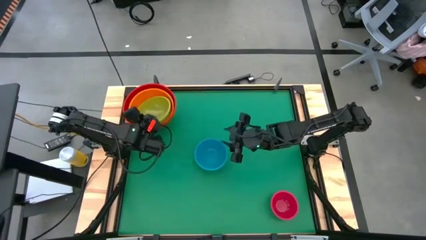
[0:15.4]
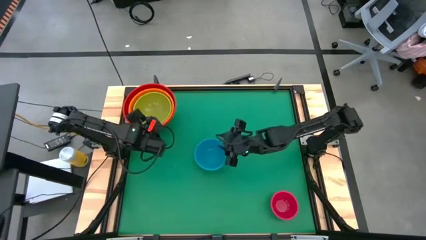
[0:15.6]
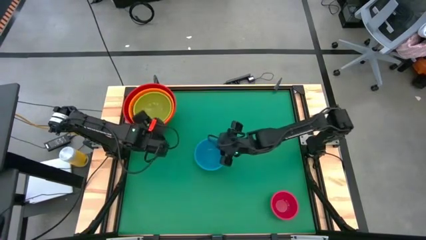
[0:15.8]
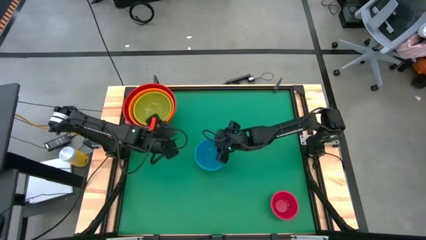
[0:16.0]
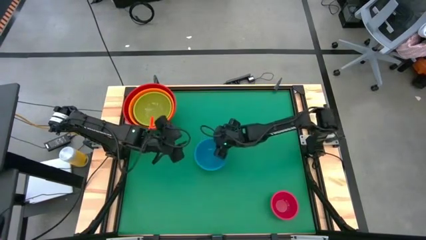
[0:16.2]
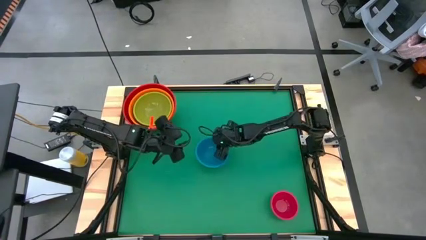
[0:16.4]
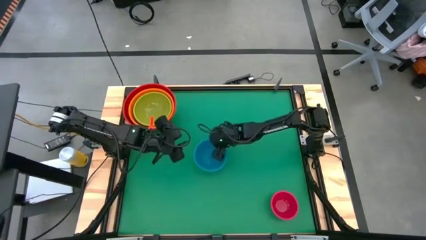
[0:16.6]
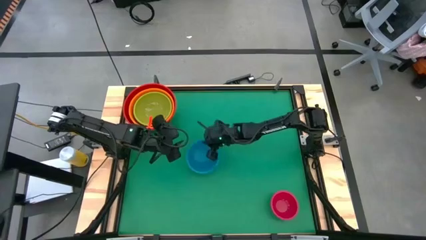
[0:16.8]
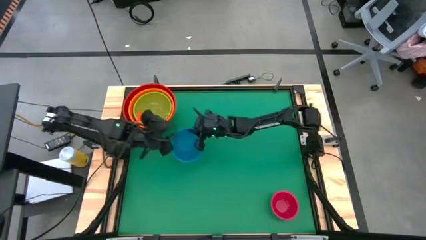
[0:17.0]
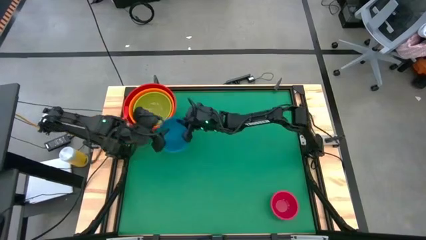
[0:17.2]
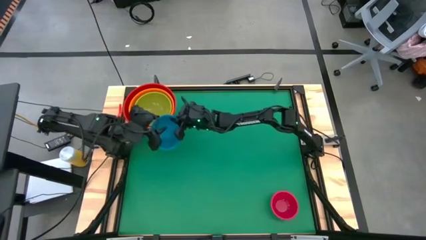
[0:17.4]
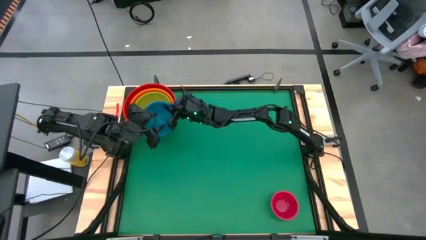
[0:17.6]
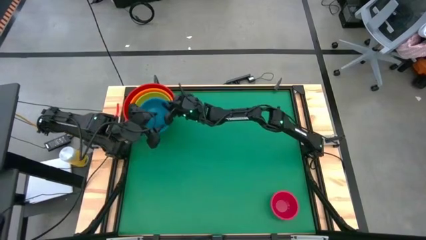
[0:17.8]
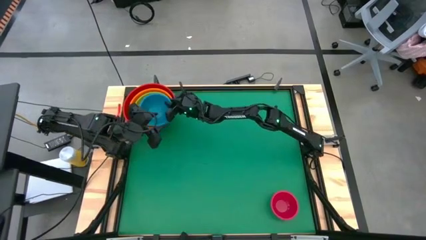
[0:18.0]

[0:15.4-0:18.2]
Stack the blue bowl on top of the green bowl

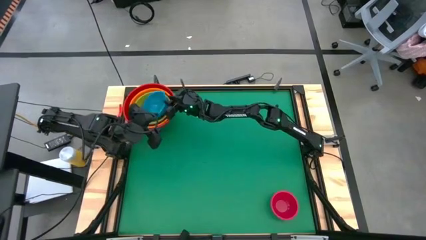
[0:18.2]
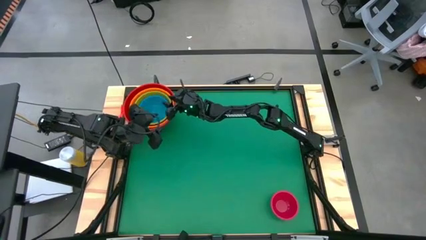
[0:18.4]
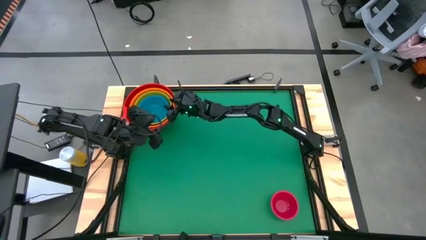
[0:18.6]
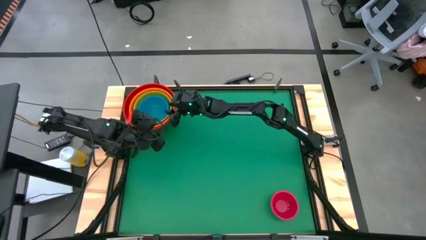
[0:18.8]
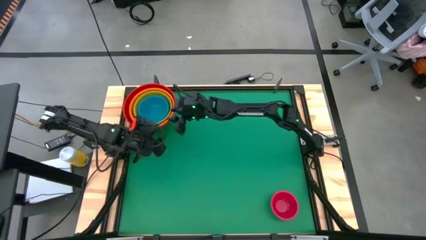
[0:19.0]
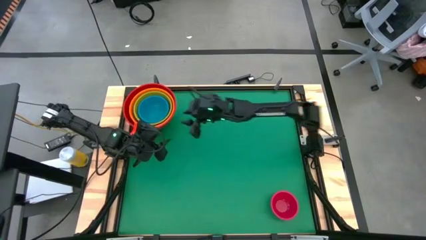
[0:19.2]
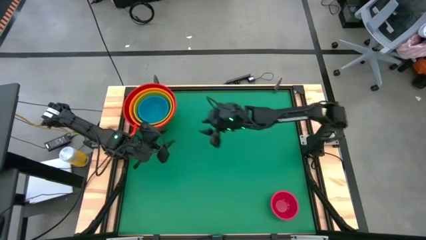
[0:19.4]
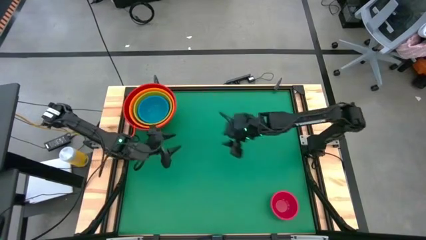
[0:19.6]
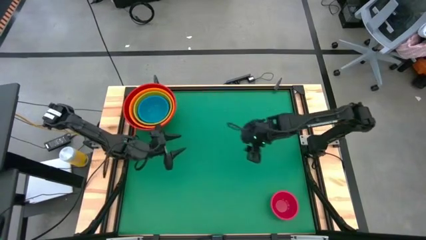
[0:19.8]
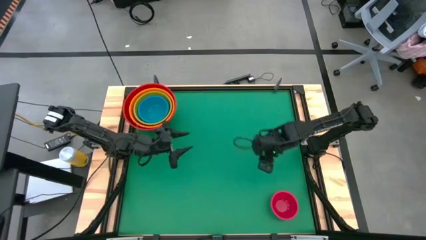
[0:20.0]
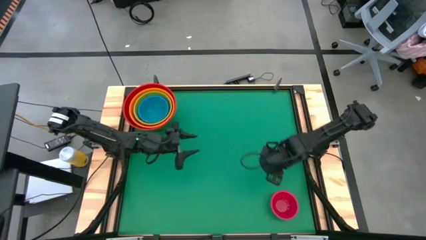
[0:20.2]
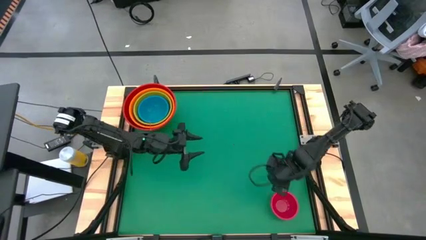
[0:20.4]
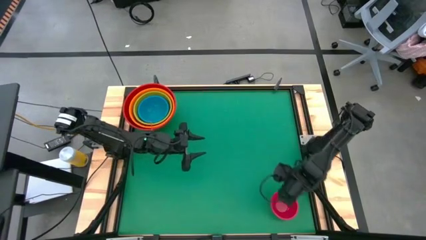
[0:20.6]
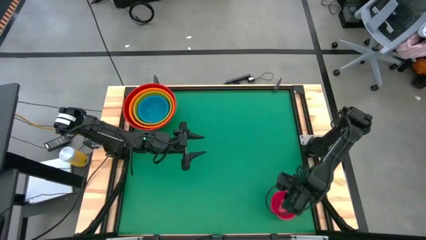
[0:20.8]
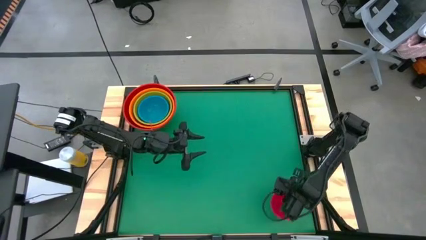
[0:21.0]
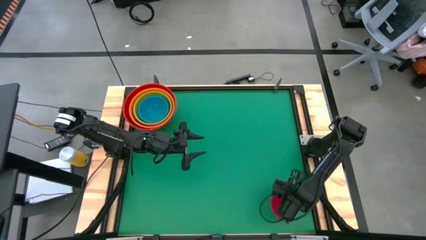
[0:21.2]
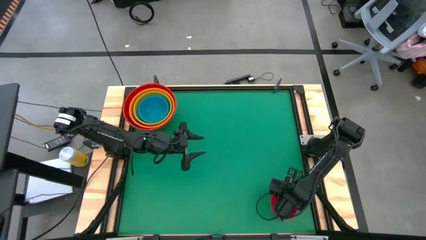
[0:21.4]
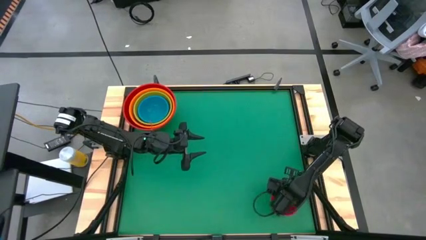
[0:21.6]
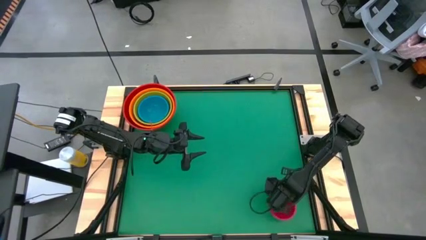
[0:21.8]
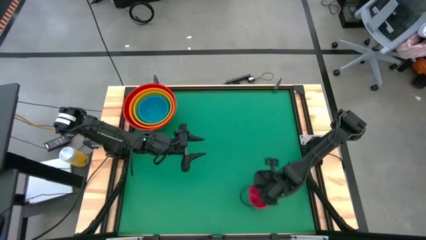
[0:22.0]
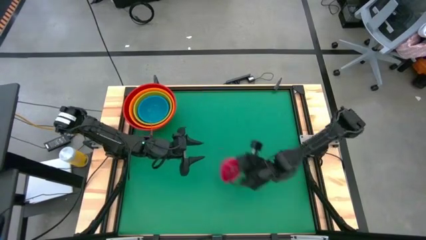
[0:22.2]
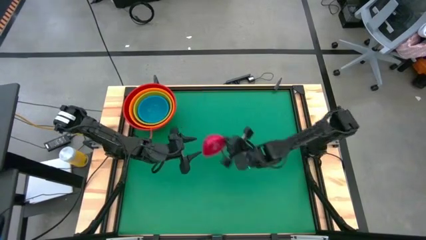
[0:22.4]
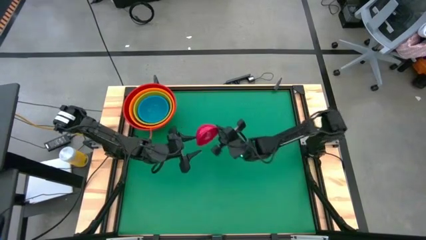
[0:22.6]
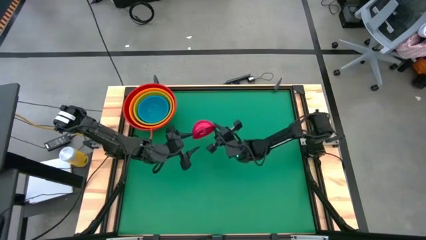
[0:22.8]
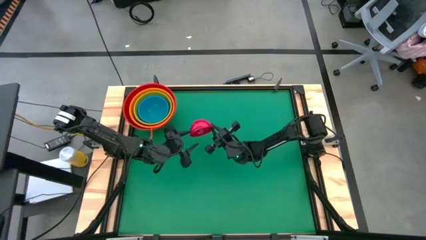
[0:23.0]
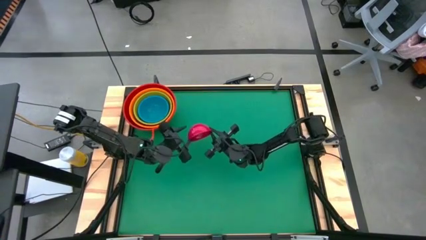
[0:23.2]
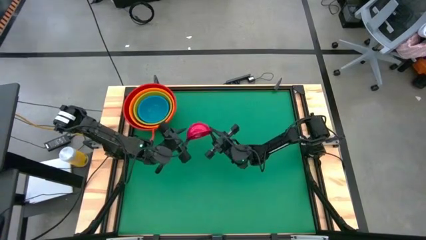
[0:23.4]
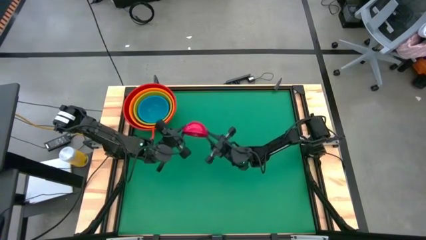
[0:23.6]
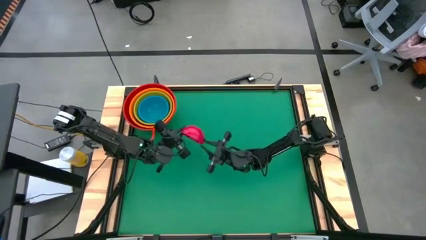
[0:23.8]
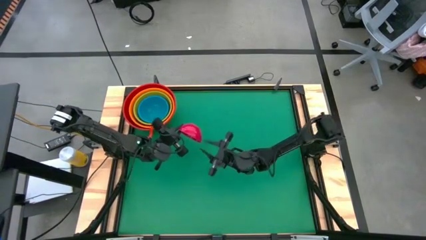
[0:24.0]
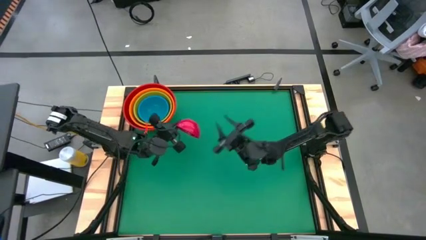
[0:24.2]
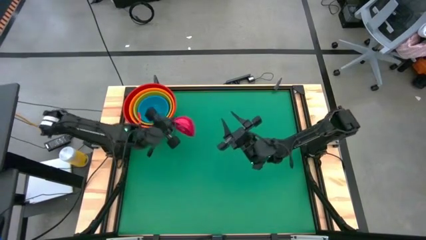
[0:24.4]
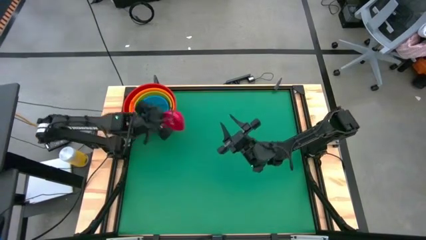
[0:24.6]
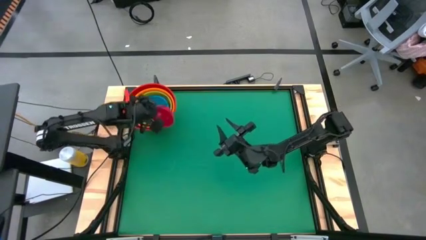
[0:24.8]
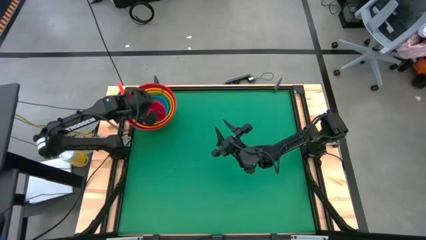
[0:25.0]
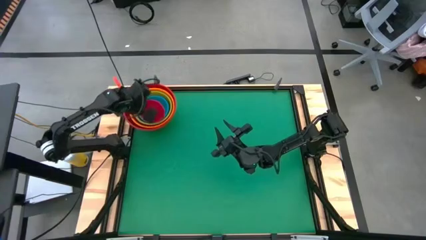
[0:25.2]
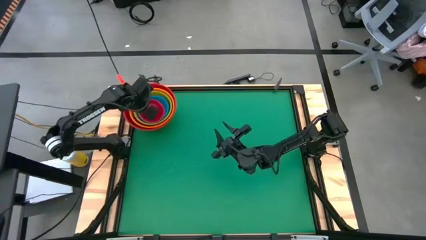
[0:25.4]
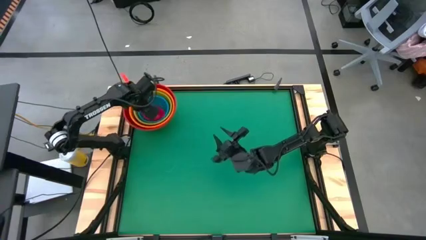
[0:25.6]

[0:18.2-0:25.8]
Stack the small red bowl on top of the blue bowl
